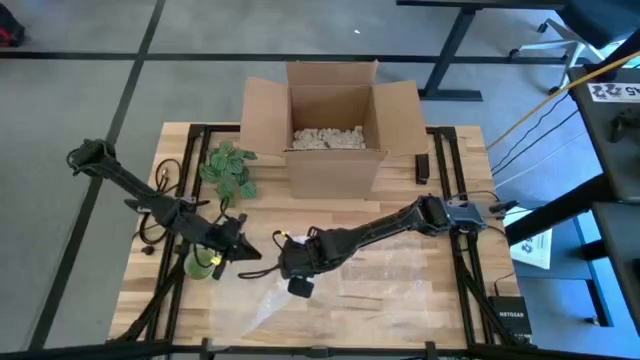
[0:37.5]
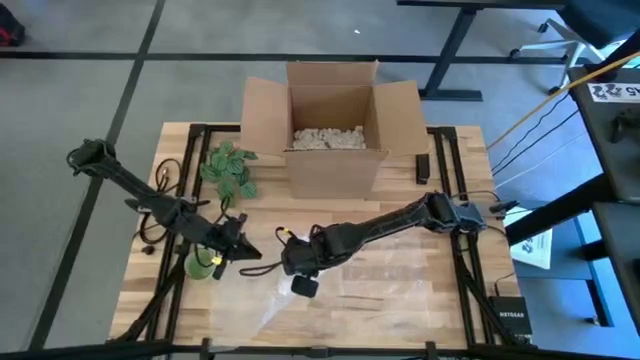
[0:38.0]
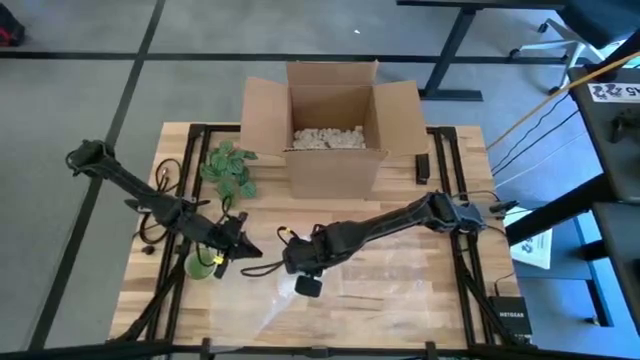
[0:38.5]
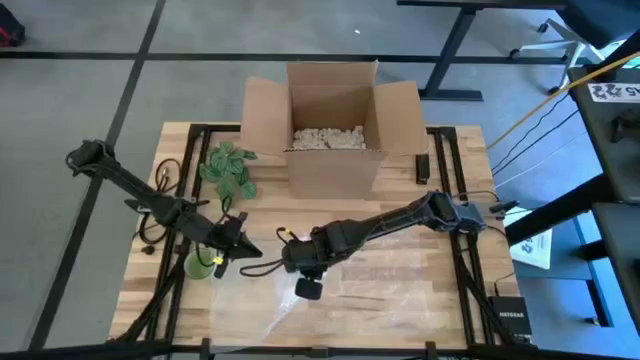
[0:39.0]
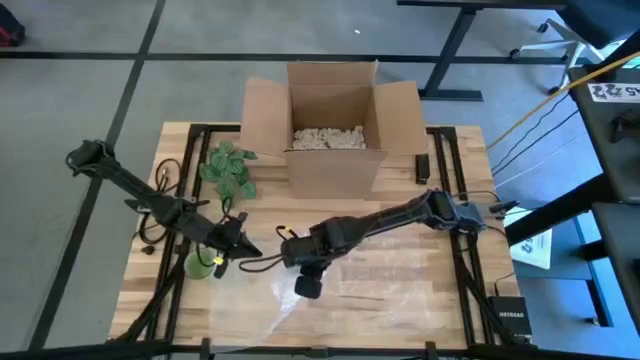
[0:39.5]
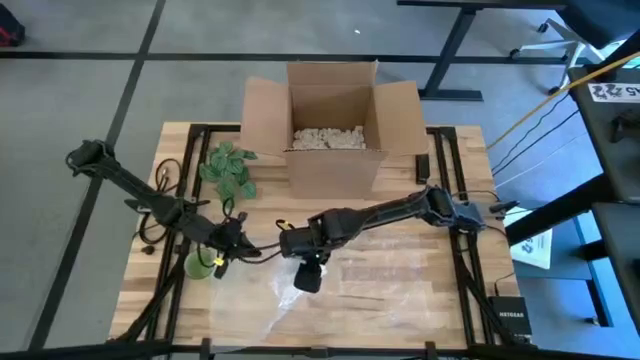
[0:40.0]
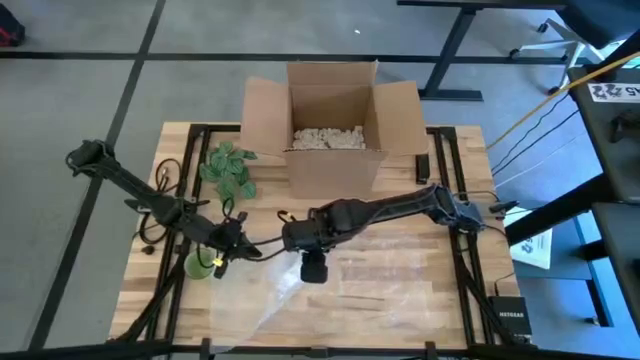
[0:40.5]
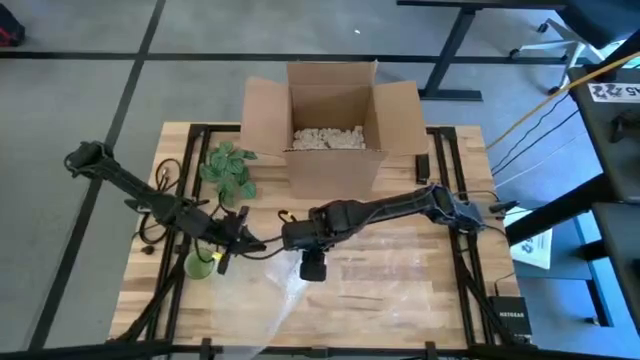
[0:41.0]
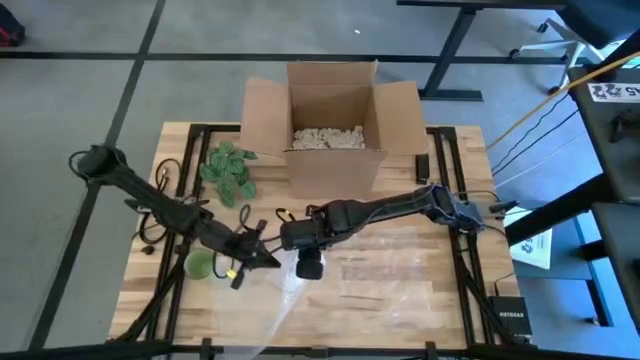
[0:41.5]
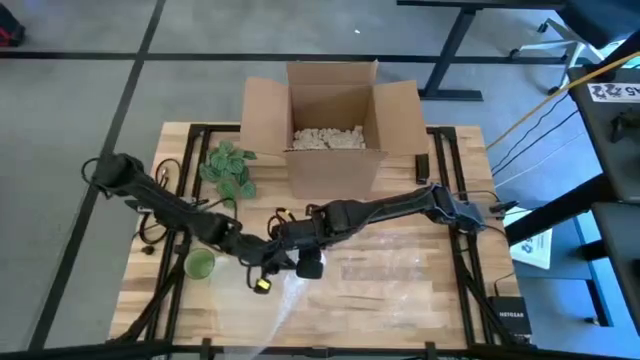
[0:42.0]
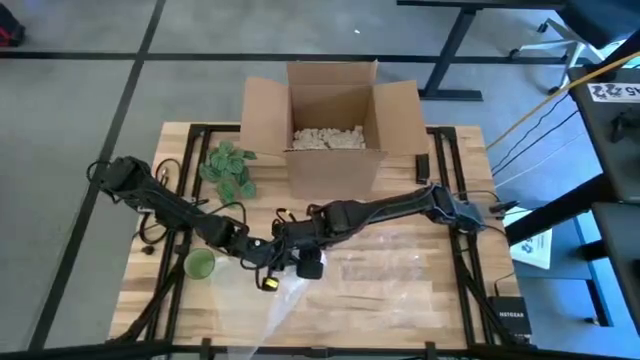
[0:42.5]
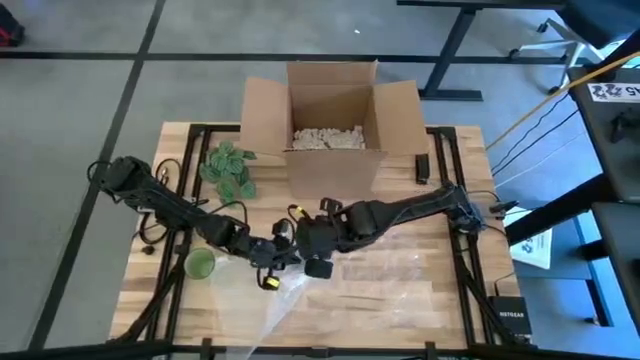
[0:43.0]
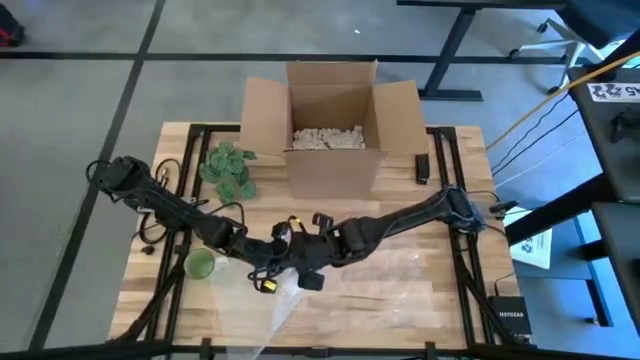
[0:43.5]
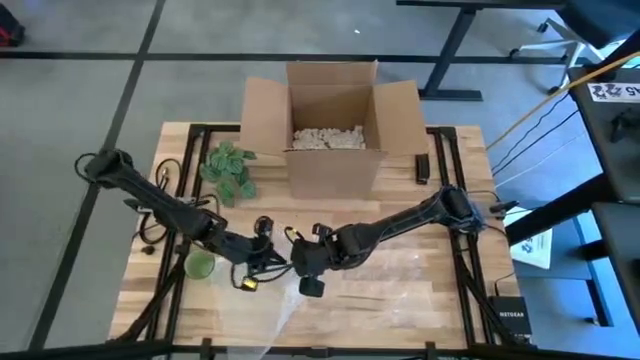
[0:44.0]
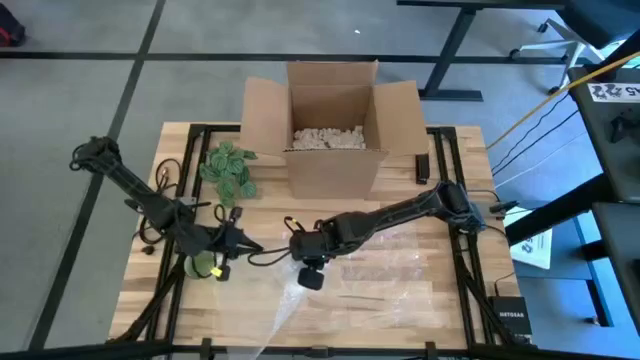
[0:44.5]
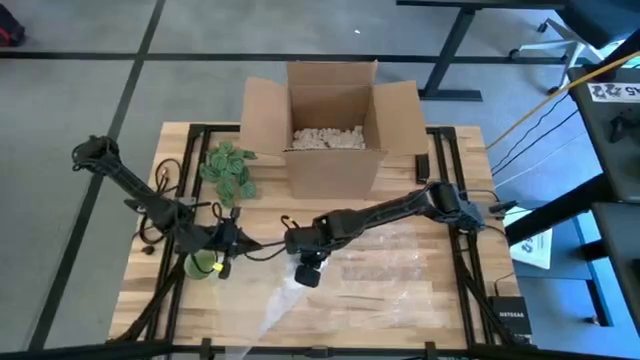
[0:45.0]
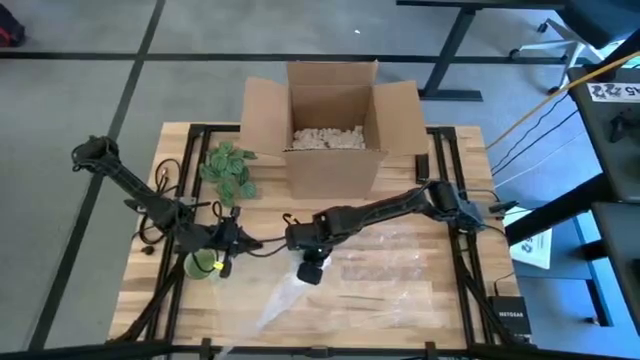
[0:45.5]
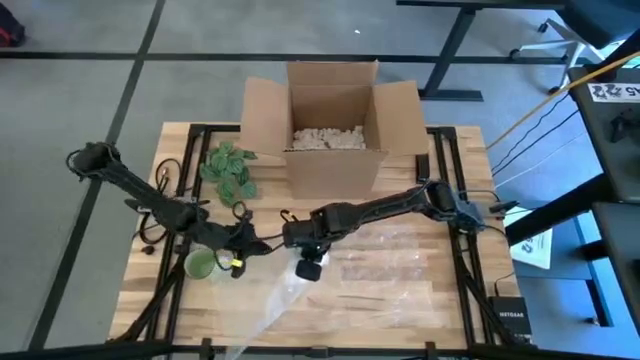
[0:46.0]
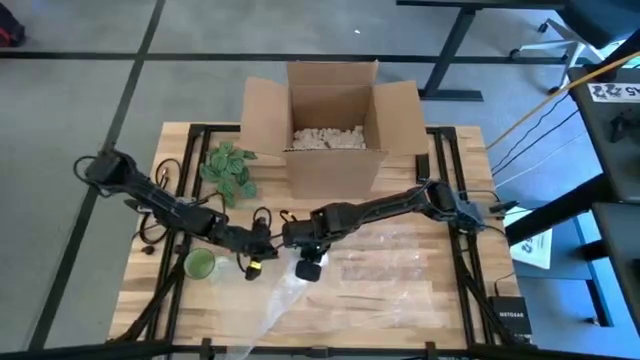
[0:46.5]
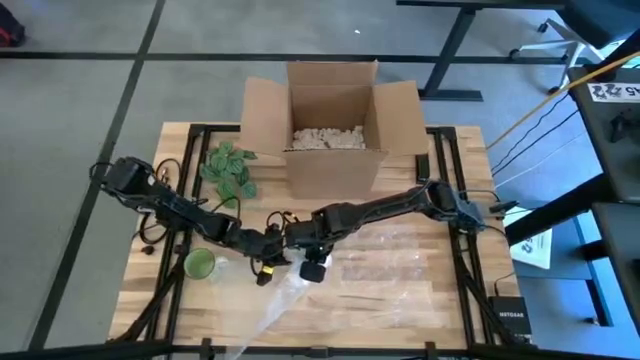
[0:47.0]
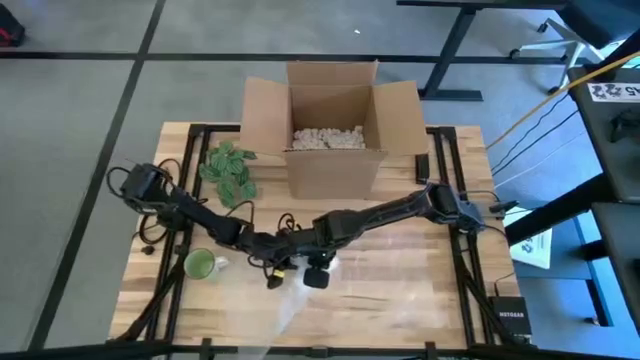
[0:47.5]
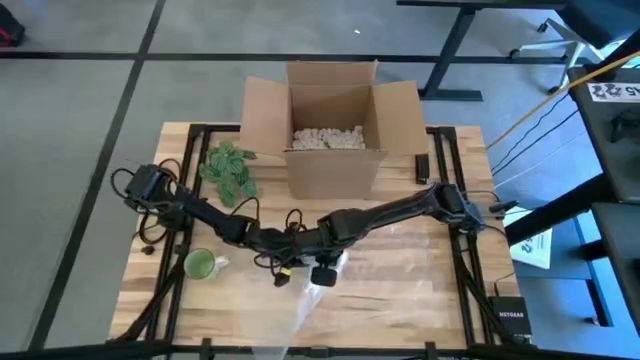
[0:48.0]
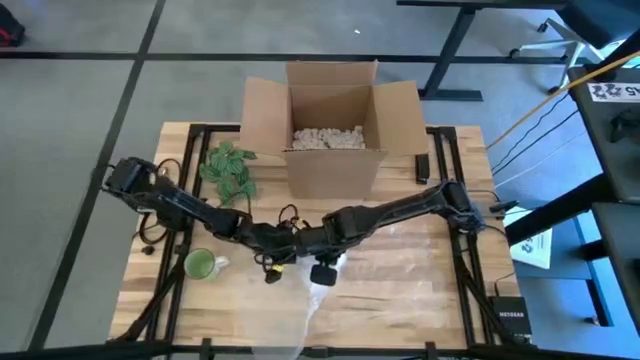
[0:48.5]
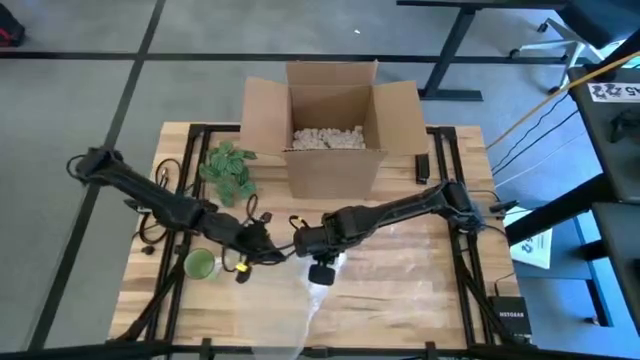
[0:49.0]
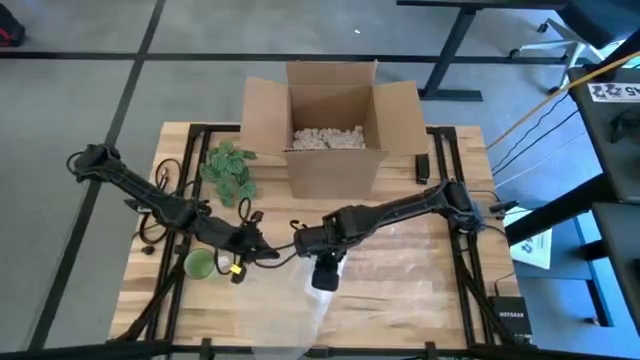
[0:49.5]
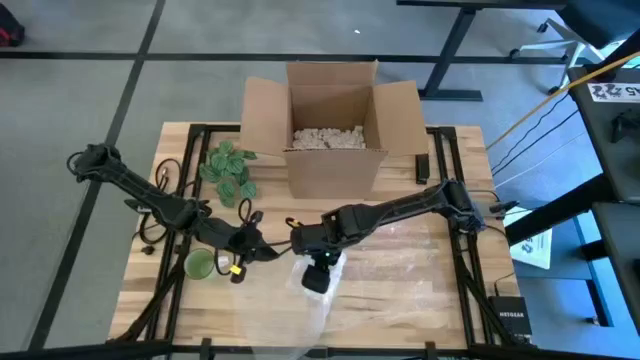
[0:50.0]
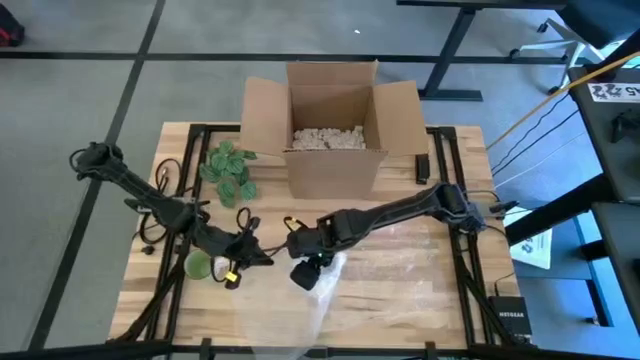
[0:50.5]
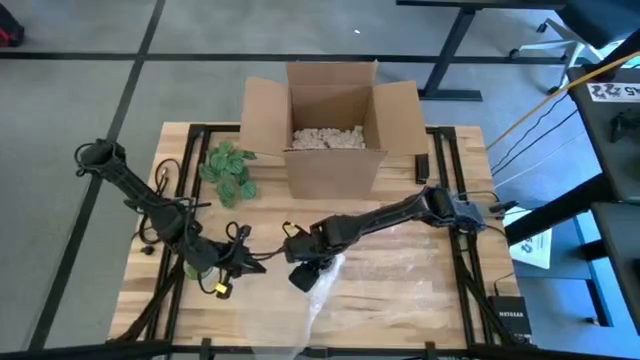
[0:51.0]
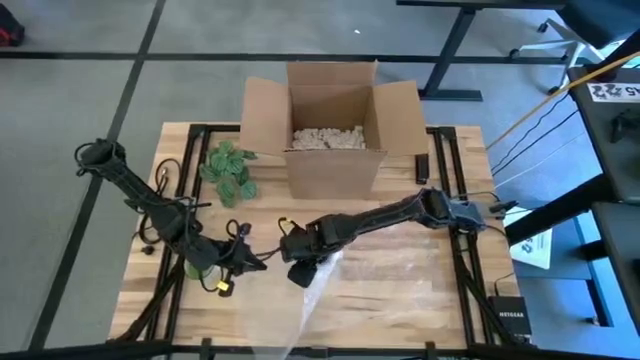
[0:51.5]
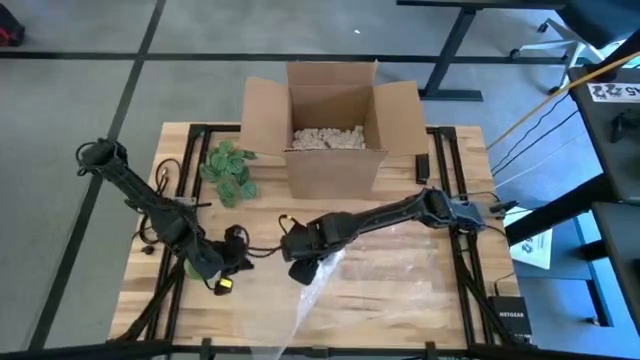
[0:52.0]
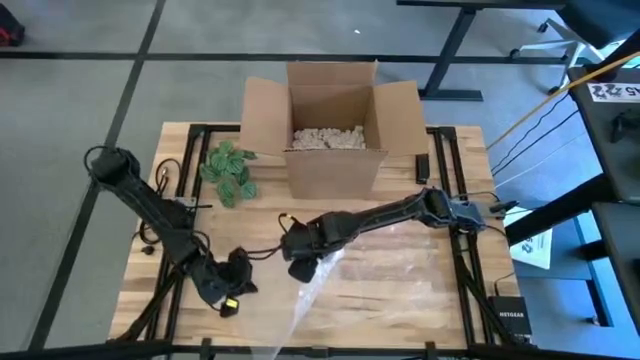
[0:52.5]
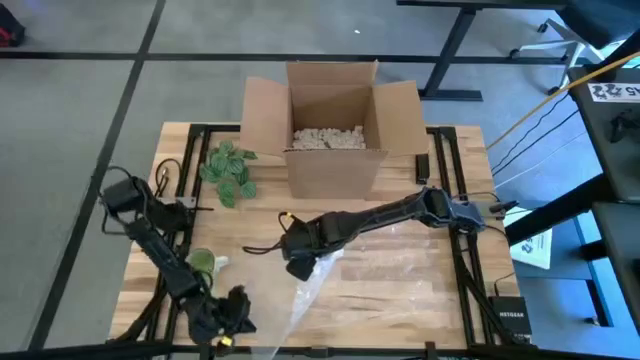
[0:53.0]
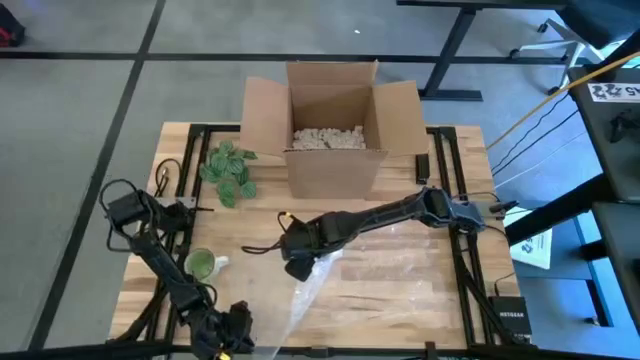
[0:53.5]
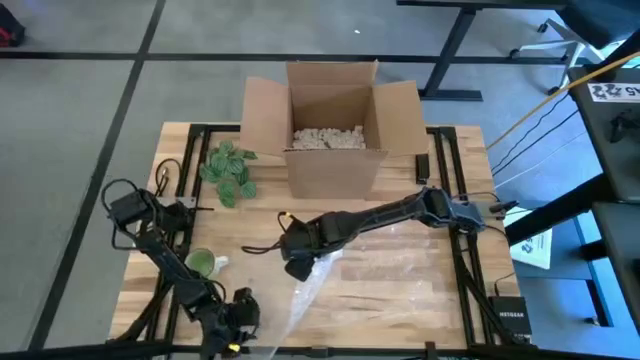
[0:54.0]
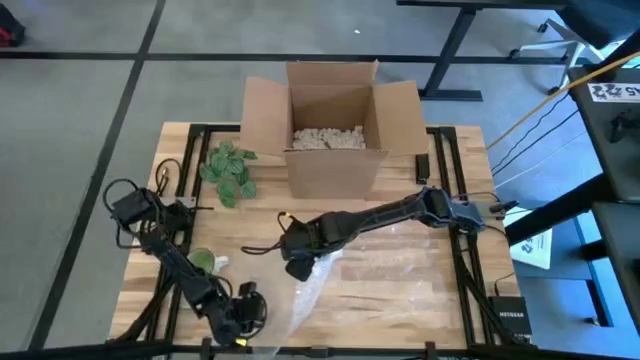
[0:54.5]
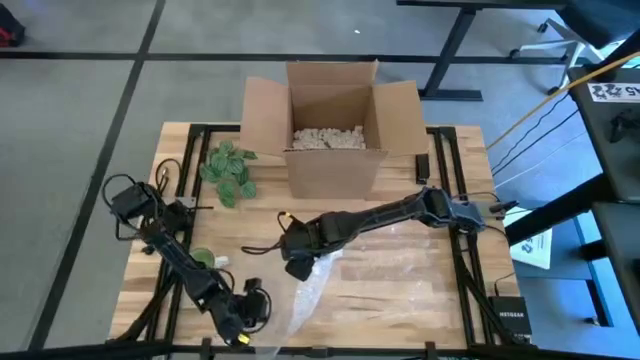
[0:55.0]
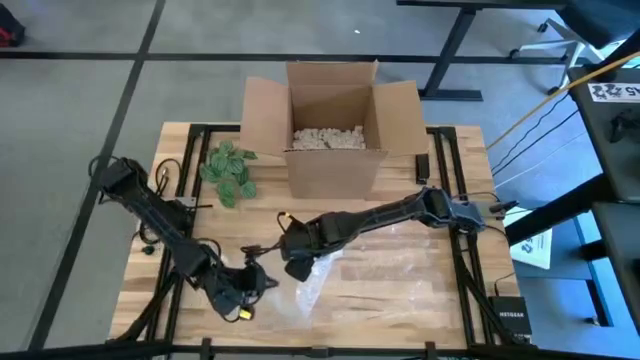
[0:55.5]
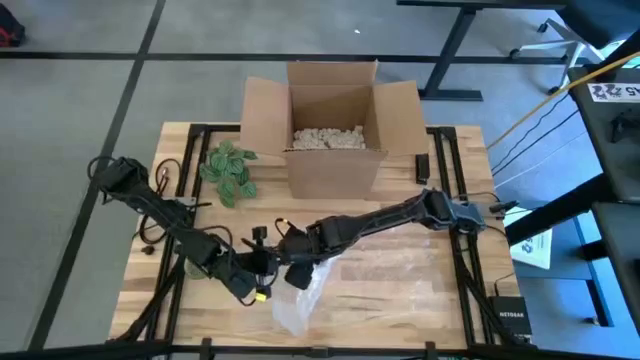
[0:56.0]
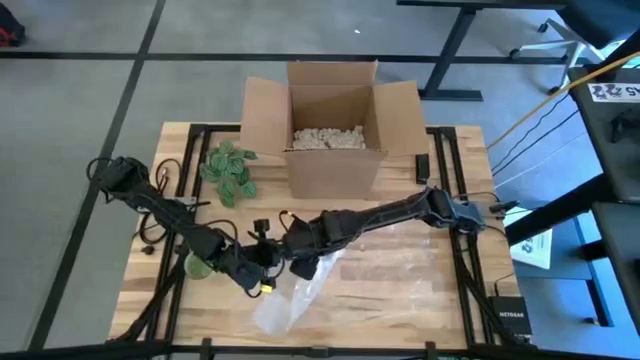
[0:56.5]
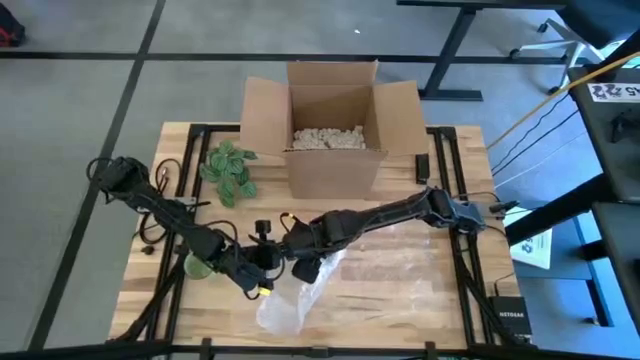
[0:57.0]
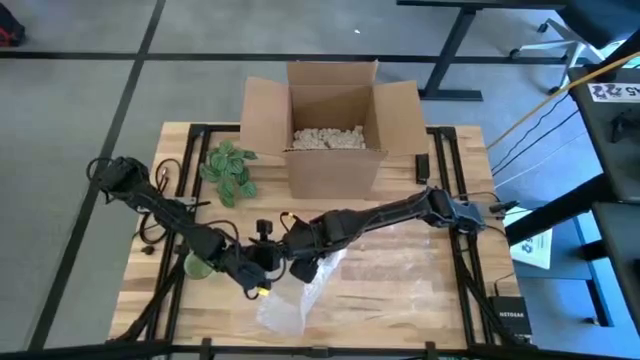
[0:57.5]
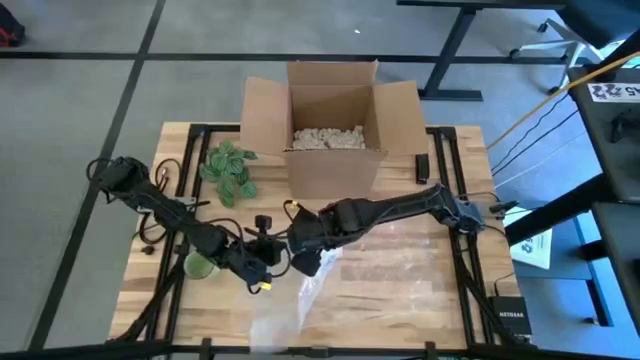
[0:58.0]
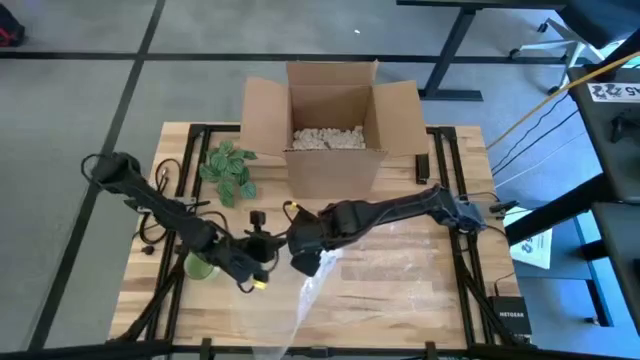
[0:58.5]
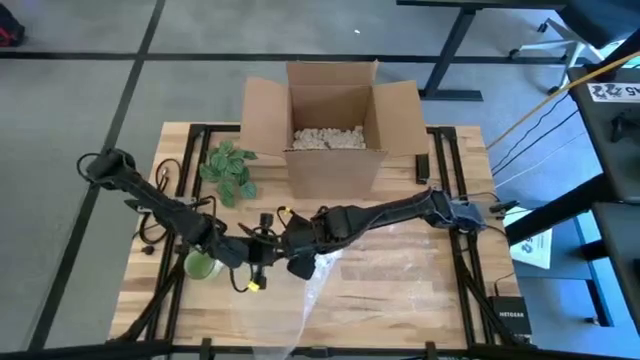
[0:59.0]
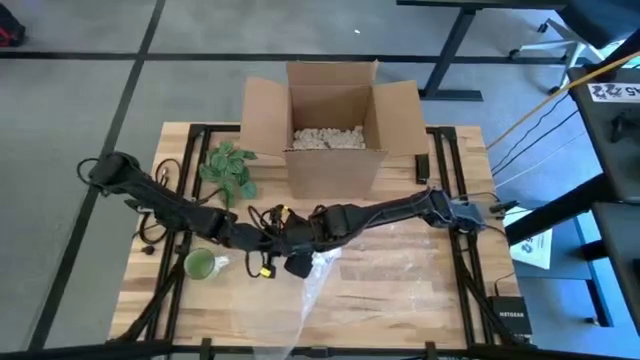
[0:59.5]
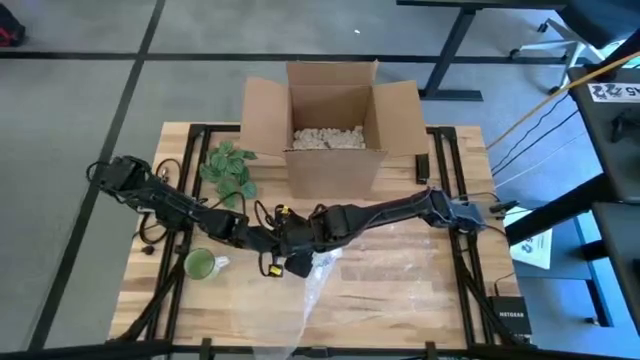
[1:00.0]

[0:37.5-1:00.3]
Task: wrap mug
Wrap the blue mug in bubble wrap
